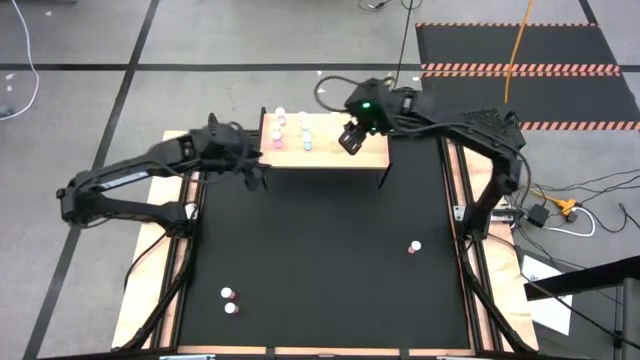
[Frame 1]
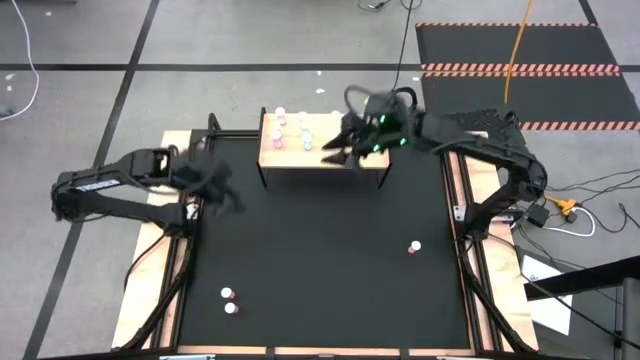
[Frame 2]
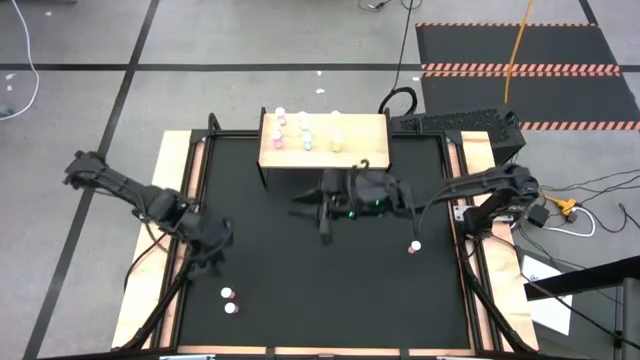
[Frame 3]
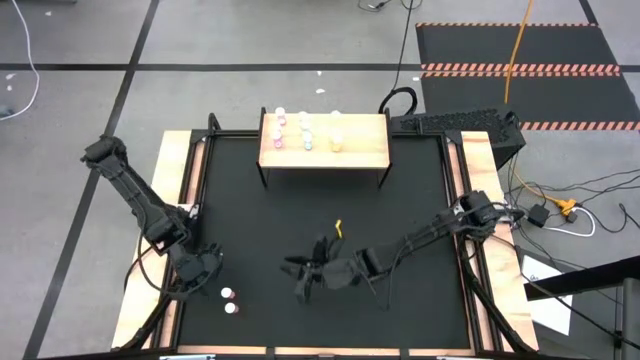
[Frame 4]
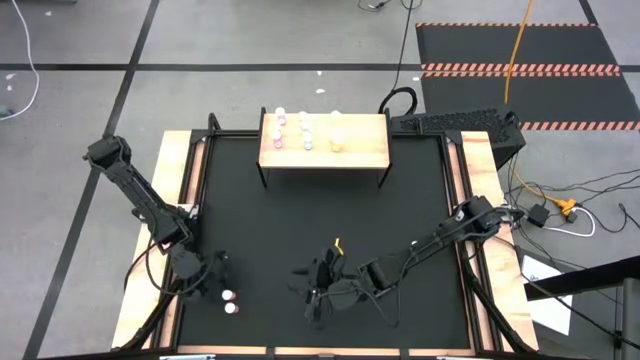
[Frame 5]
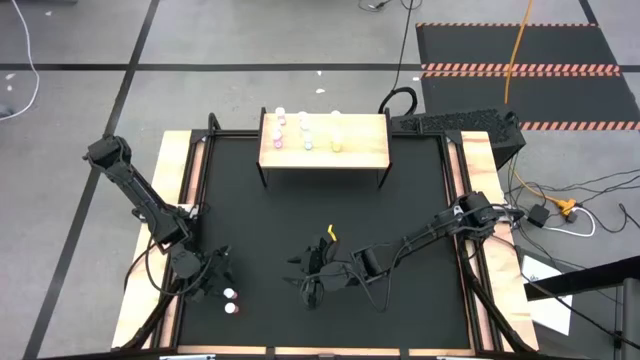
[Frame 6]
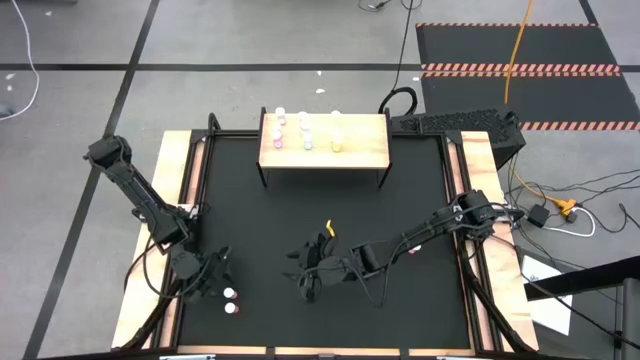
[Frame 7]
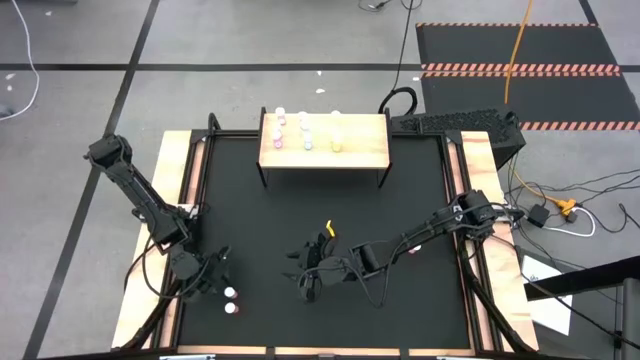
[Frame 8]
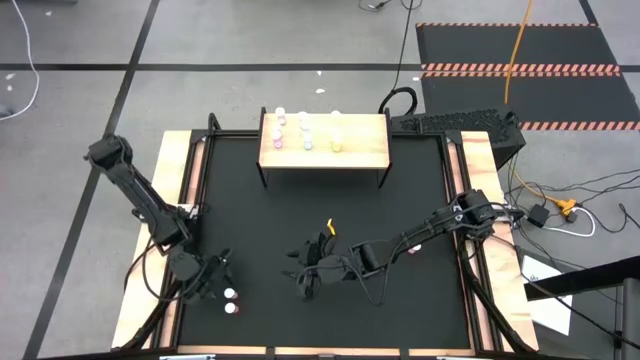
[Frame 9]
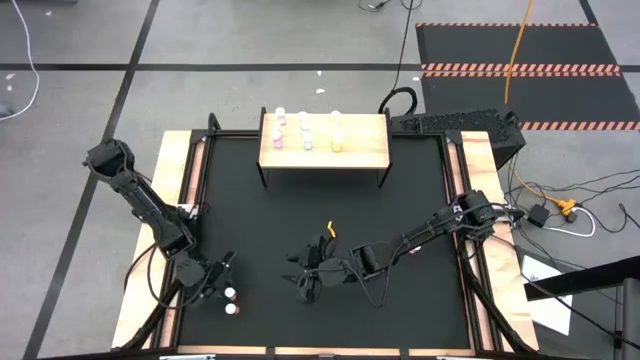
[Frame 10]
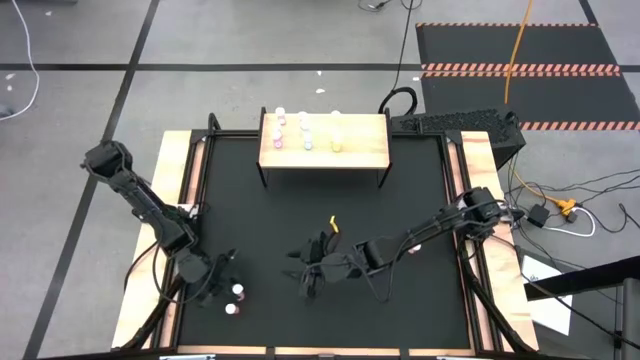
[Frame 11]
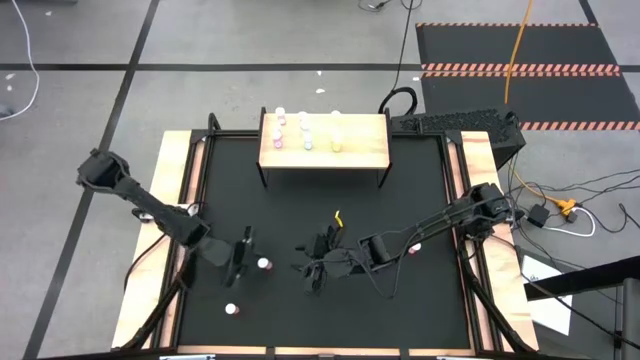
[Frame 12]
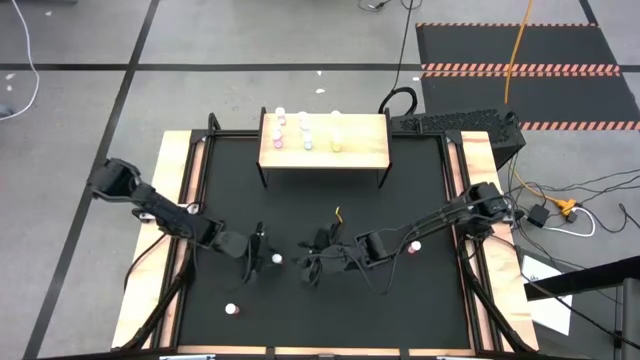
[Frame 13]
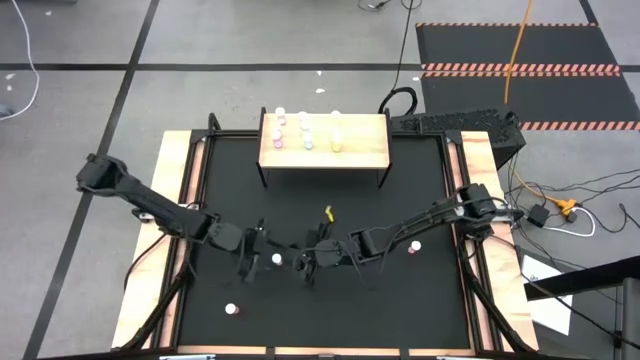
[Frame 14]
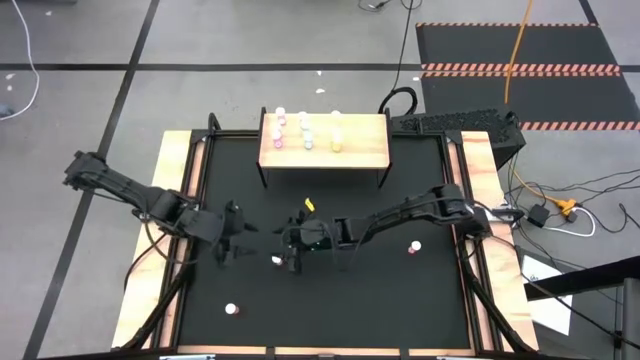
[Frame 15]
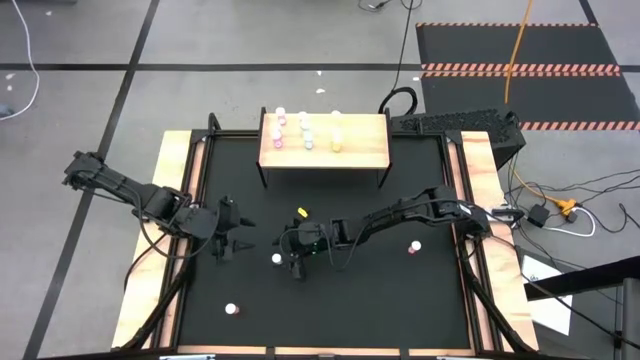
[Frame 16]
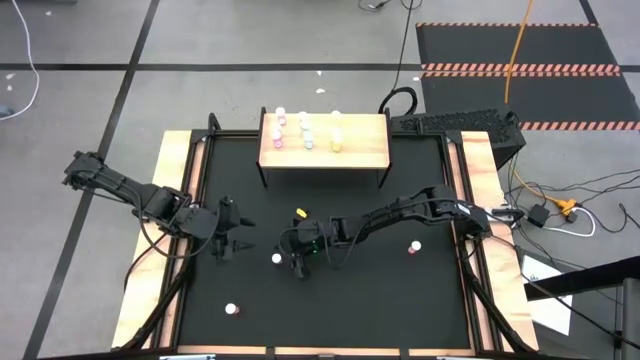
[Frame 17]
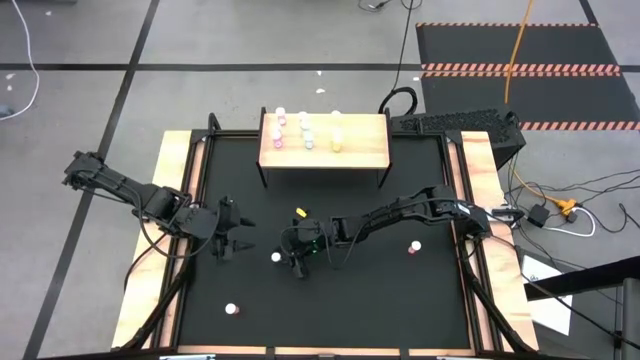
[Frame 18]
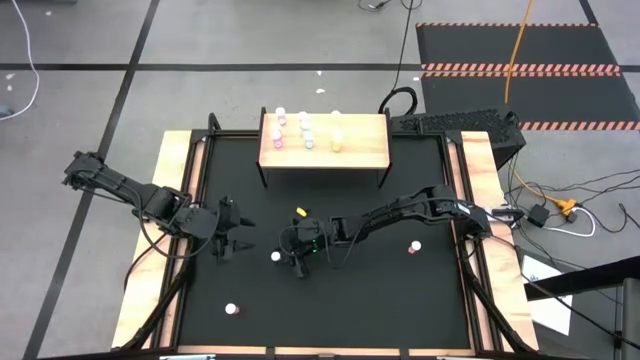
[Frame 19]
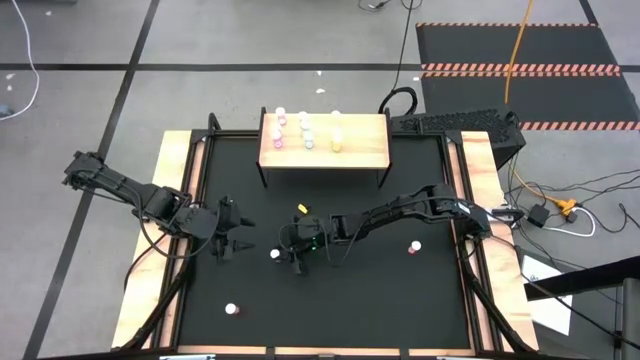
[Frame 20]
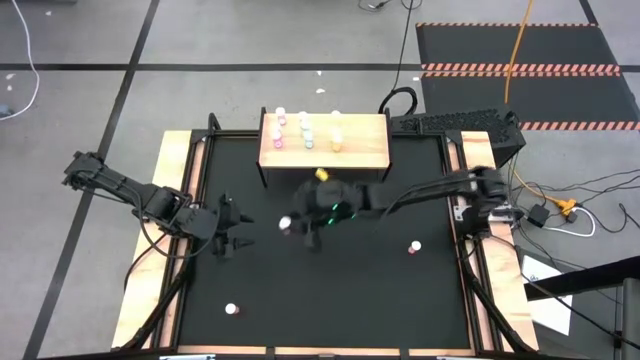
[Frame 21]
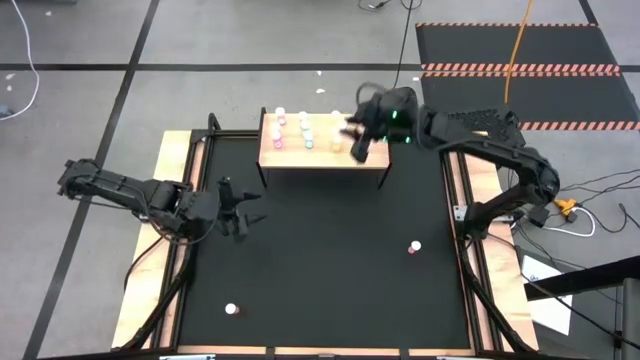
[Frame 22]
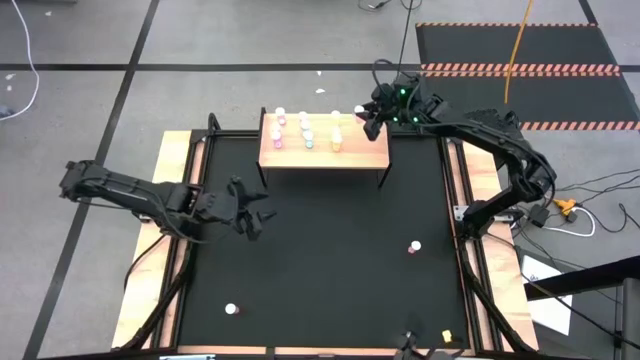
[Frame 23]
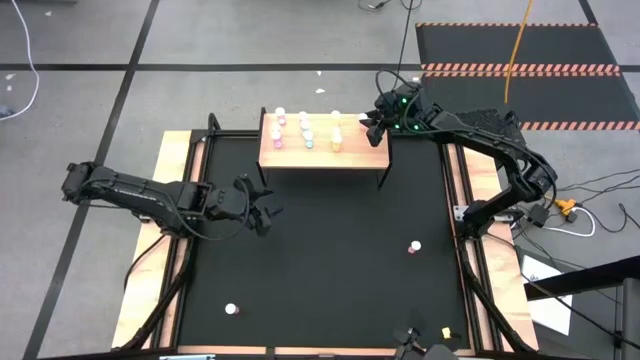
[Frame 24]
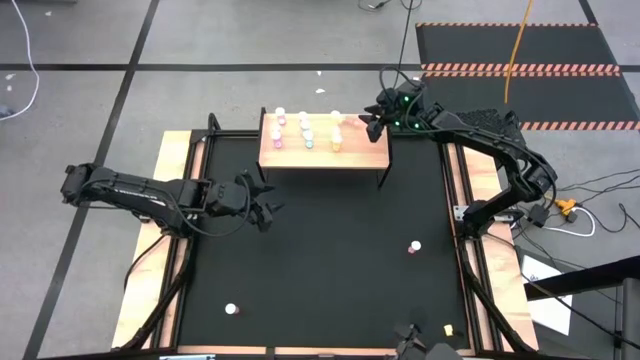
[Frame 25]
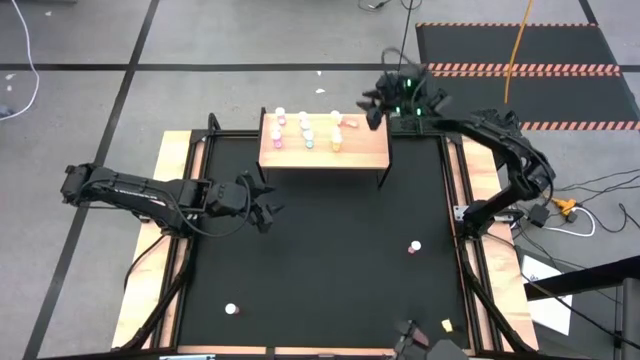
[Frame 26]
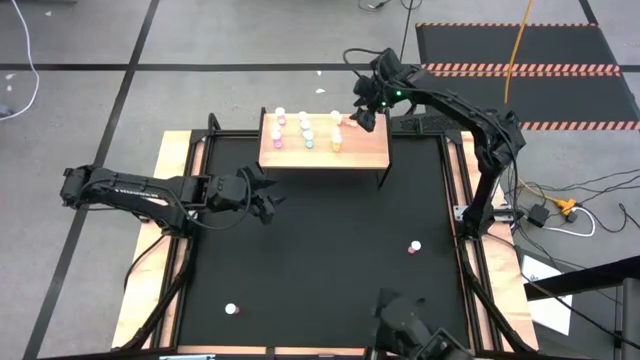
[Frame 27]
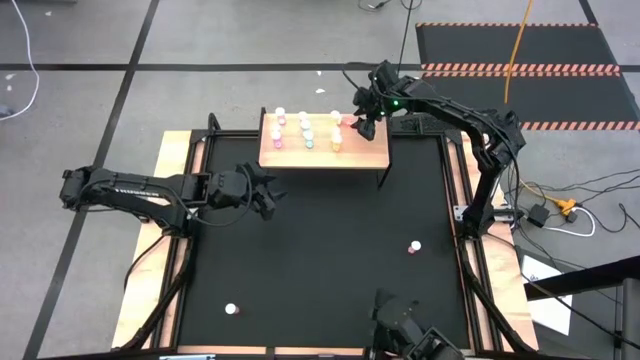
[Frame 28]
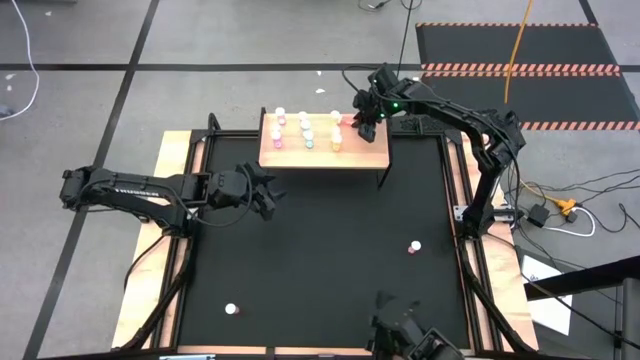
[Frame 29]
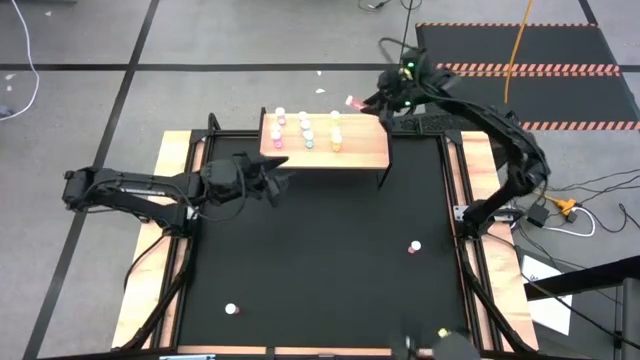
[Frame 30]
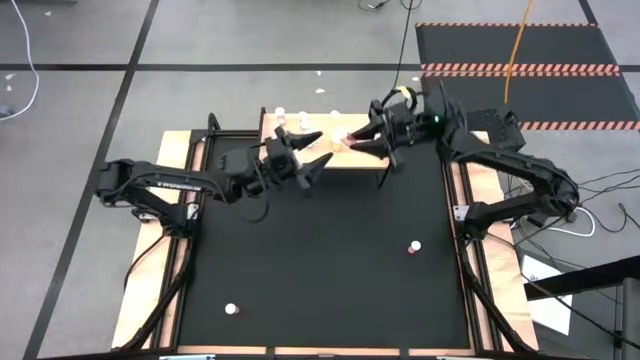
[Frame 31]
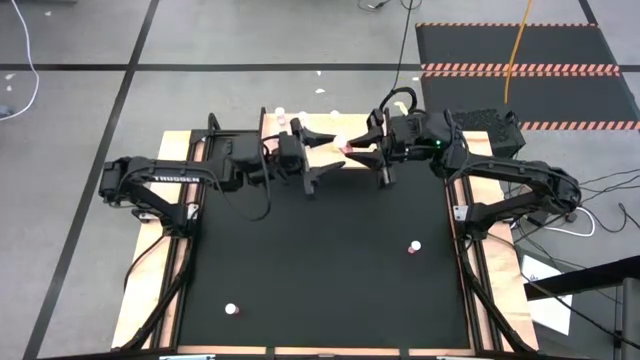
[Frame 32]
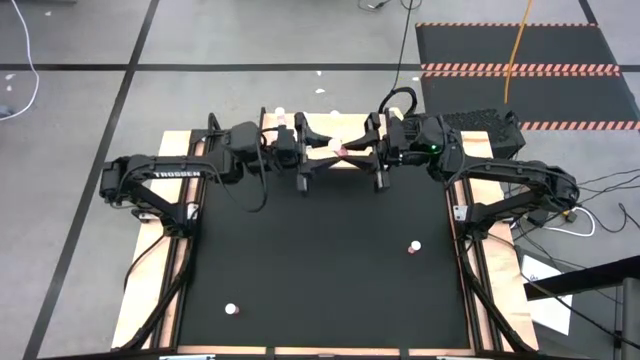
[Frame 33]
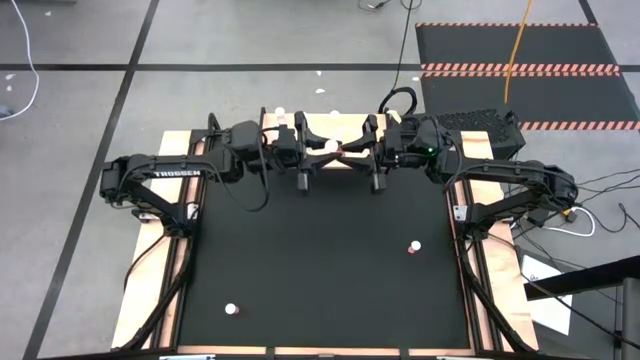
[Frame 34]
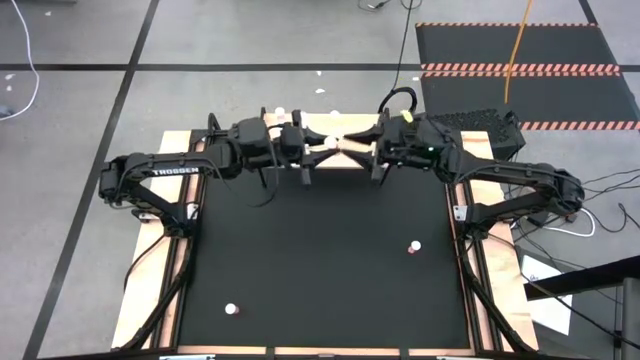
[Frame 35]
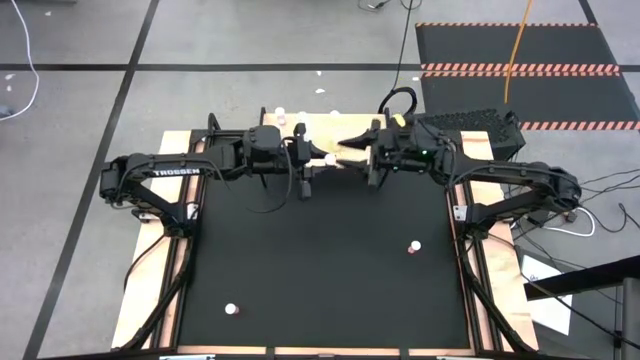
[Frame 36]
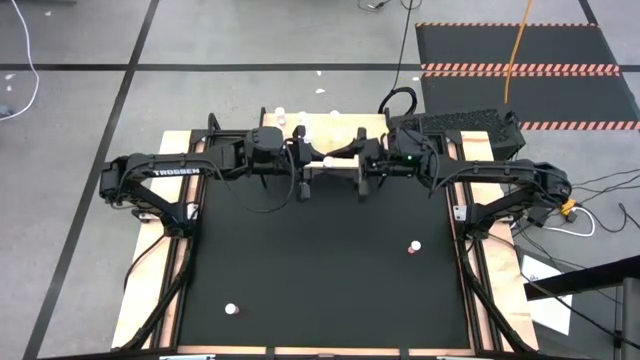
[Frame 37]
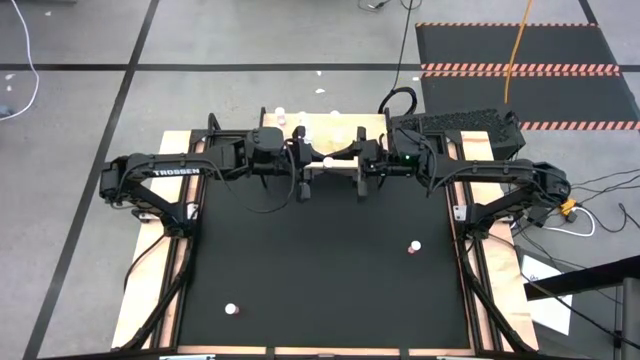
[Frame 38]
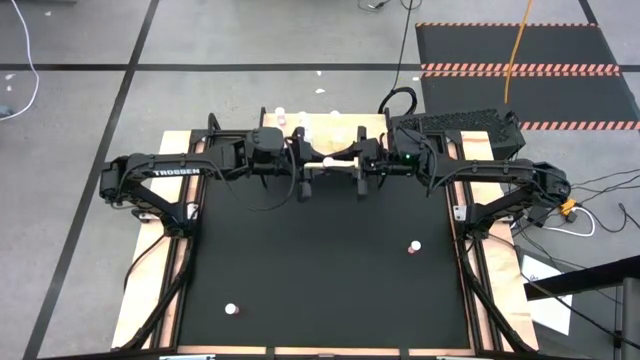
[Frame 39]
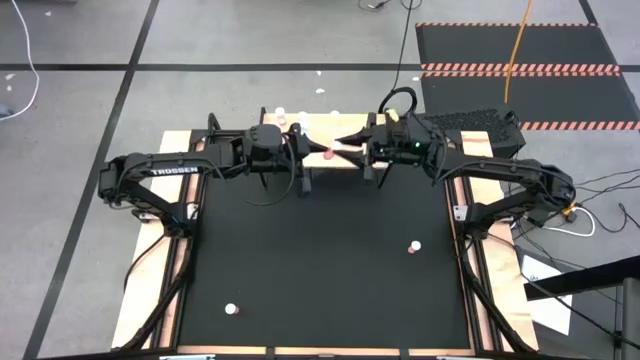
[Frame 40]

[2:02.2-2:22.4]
Task: Pick and place medicine bottles onto shelf by color
Put the top left pink pill bottle on the shelf
